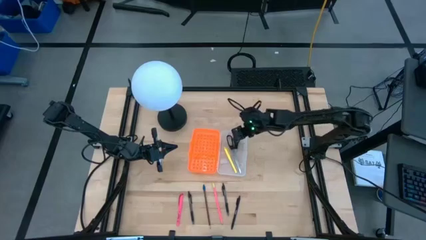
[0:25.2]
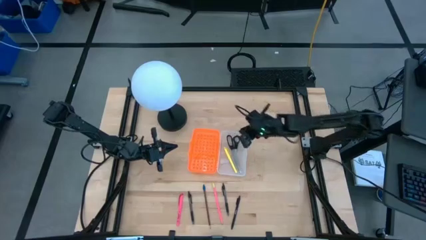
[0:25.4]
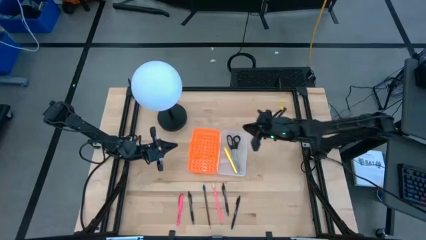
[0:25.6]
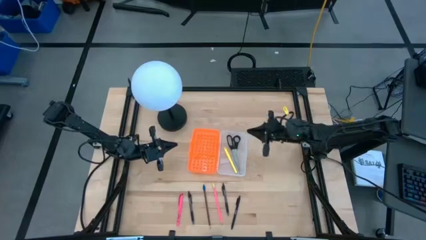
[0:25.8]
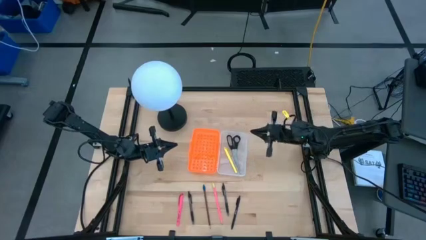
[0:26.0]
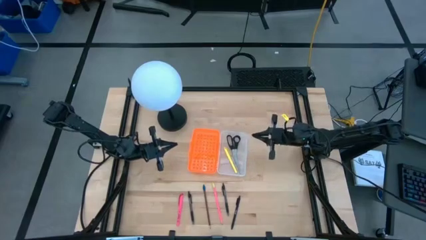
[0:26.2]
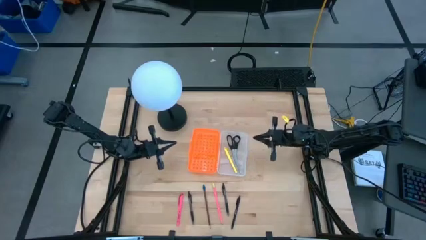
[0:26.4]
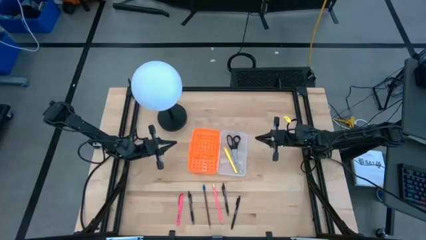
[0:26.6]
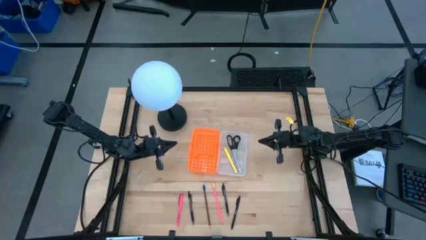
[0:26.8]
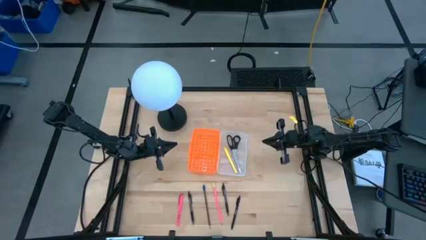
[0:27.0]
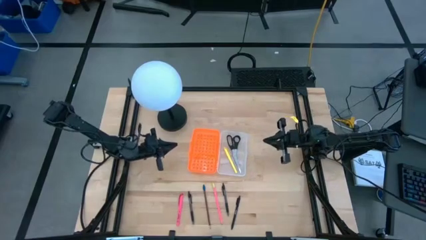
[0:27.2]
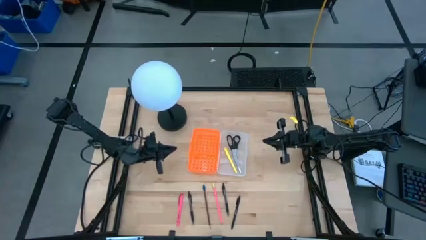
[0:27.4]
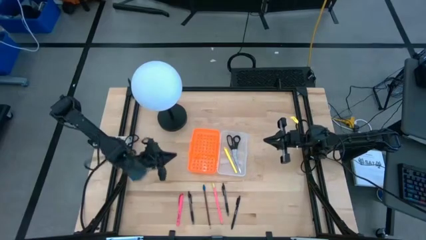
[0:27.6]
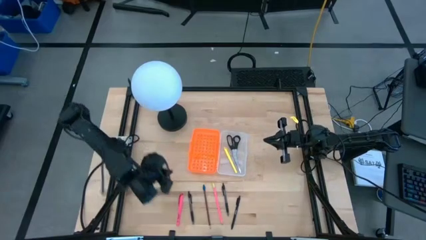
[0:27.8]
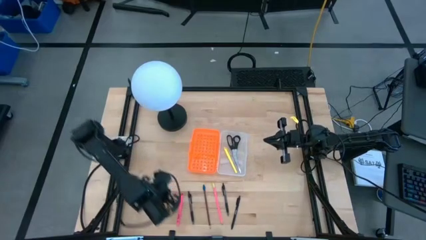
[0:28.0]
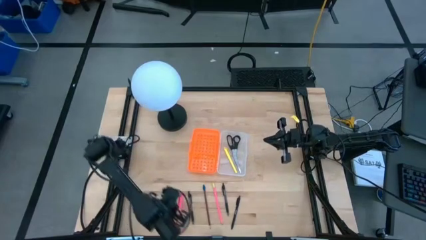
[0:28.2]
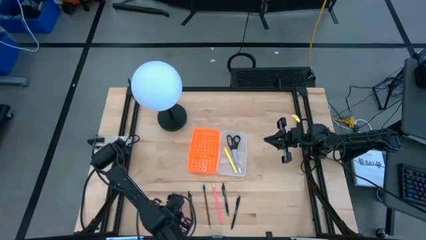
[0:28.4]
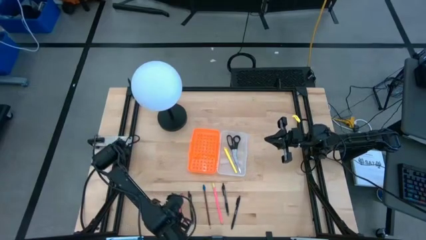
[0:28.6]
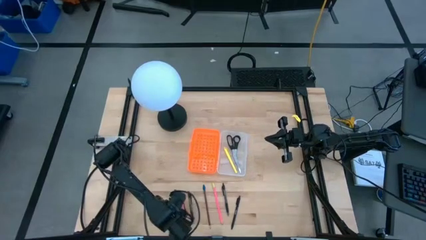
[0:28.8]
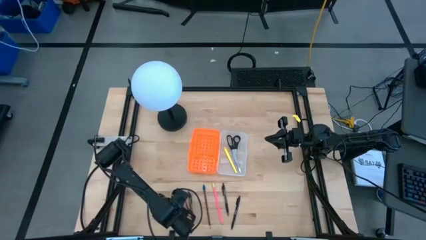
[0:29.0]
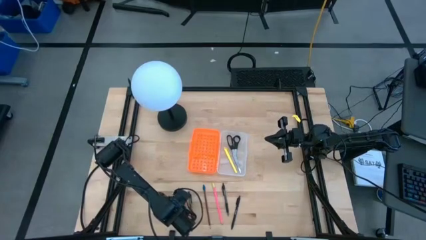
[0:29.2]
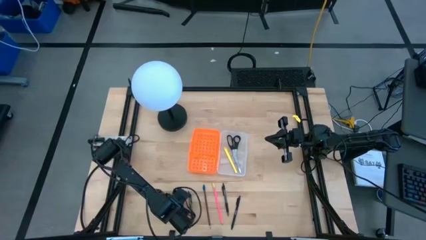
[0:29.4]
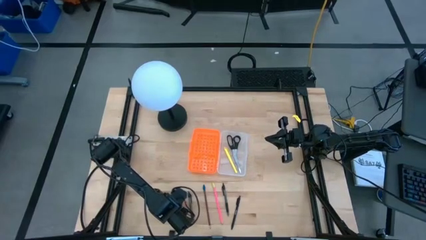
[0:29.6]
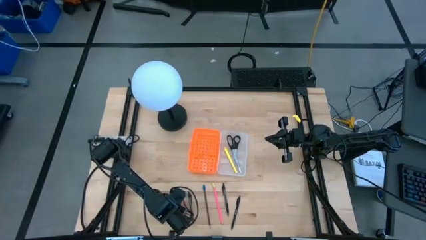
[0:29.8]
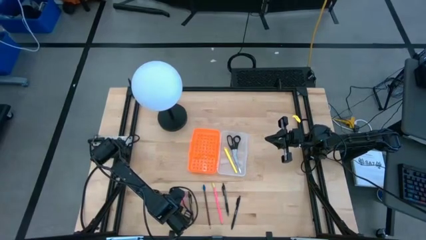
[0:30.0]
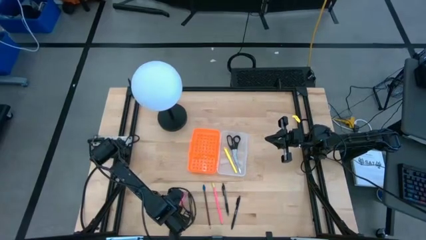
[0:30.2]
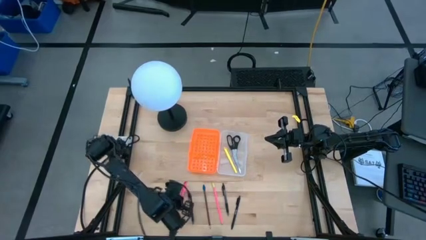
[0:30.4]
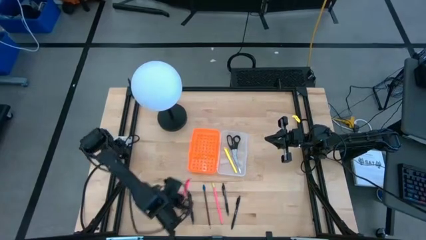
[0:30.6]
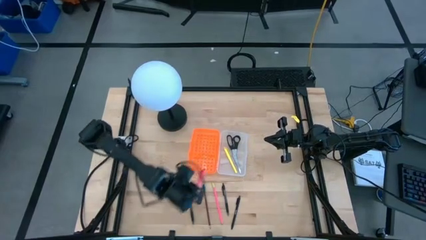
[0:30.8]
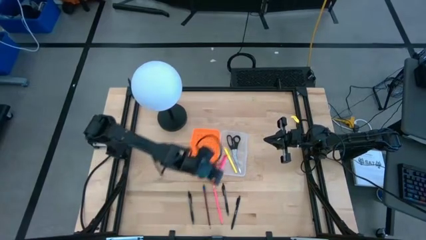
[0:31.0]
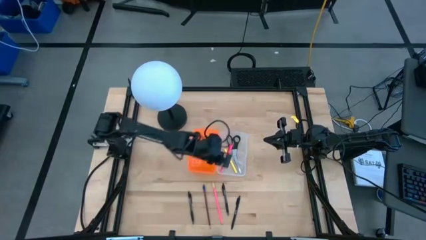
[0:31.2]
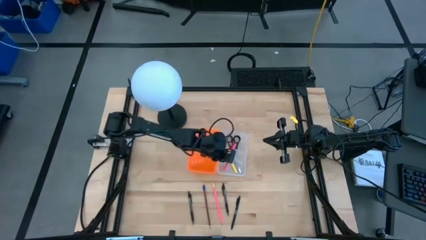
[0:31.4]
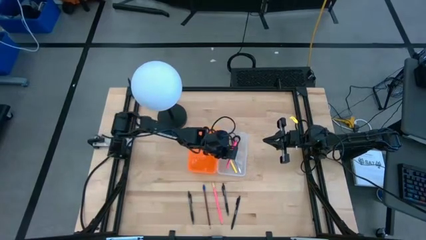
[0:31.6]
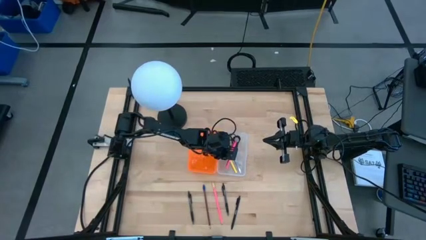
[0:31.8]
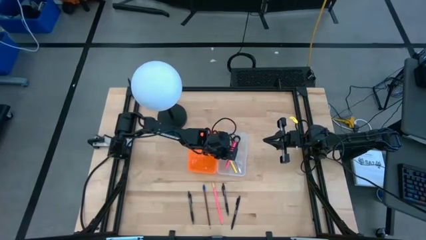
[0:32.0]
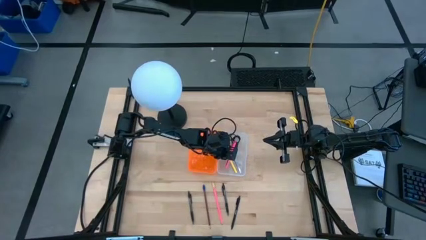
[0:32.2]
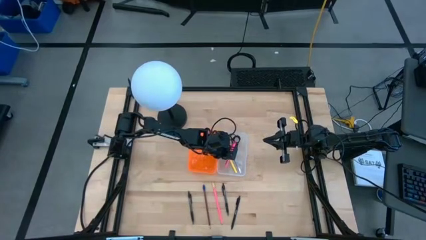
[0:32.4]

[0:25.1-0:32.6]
Task: Pick & place school supplies into a supply box
Put the pink pen into the orange supply box

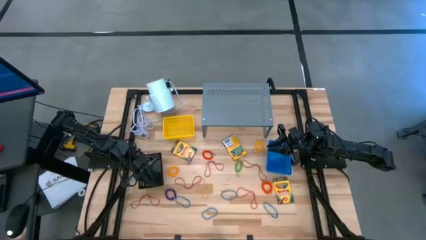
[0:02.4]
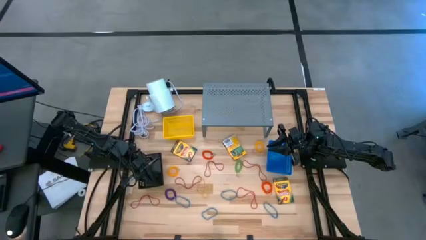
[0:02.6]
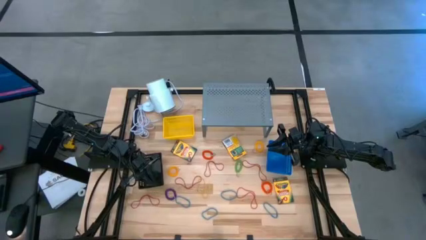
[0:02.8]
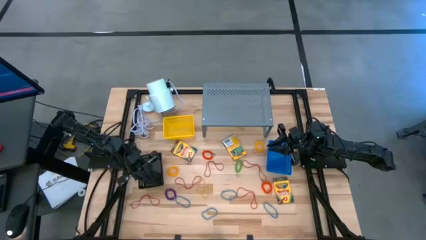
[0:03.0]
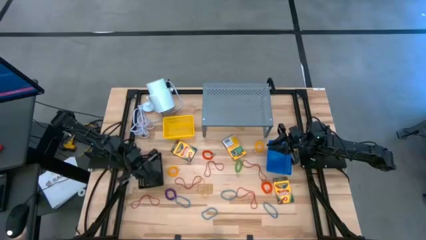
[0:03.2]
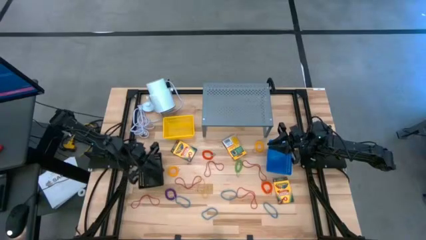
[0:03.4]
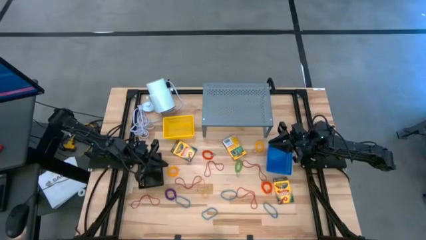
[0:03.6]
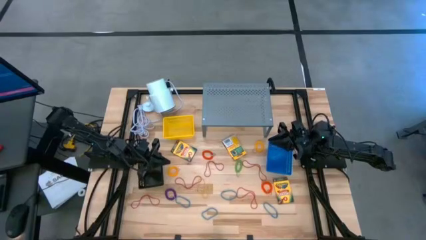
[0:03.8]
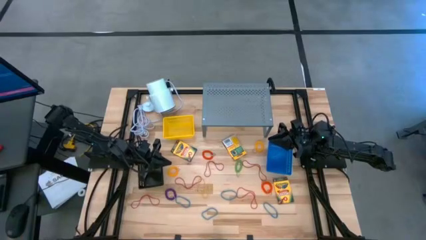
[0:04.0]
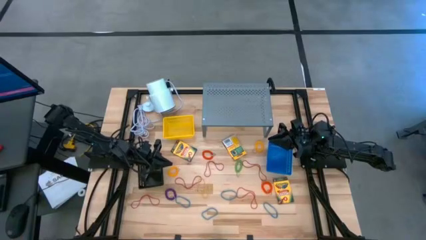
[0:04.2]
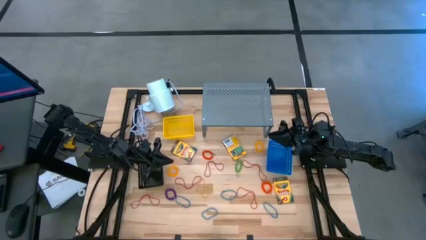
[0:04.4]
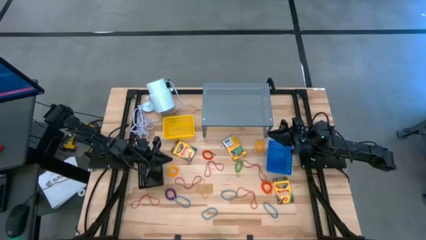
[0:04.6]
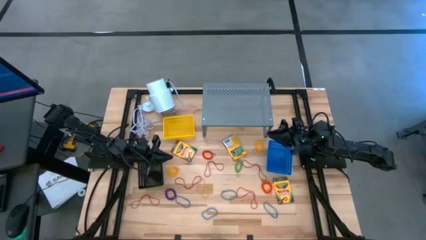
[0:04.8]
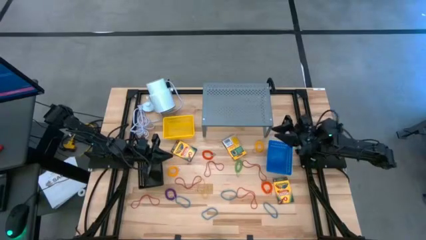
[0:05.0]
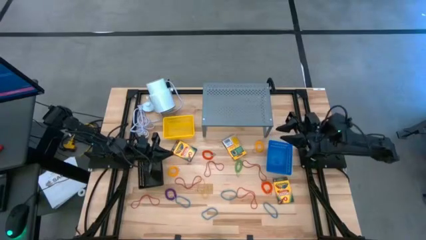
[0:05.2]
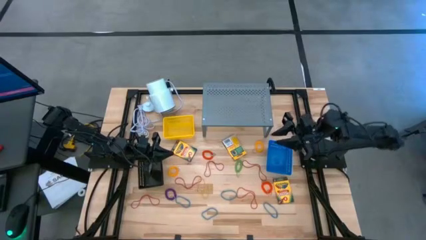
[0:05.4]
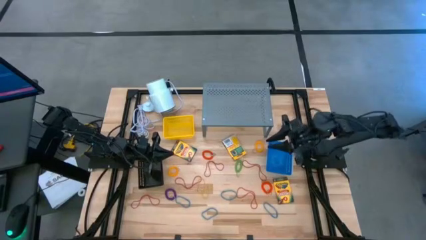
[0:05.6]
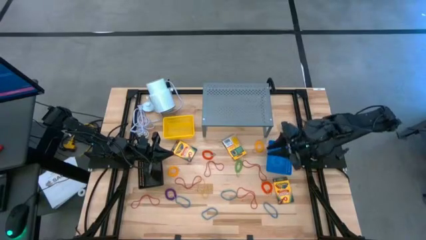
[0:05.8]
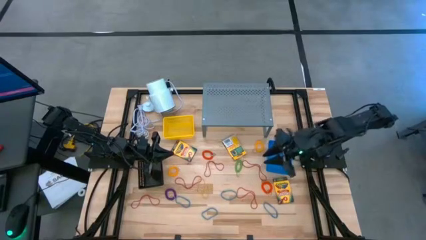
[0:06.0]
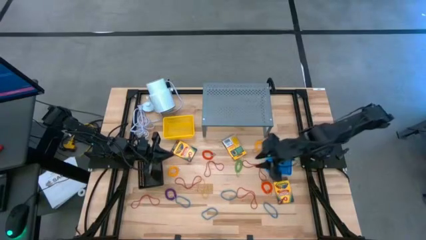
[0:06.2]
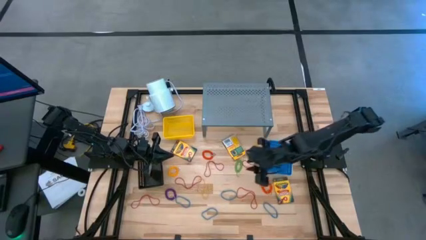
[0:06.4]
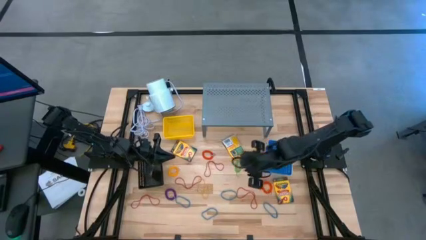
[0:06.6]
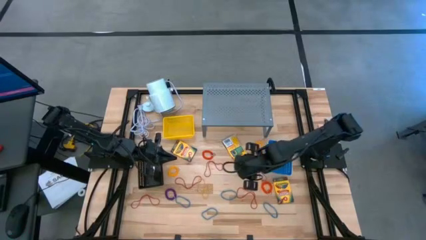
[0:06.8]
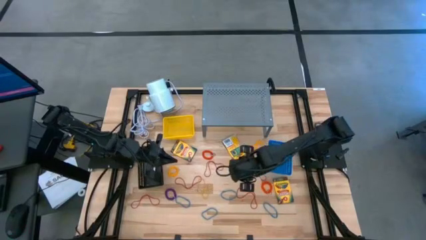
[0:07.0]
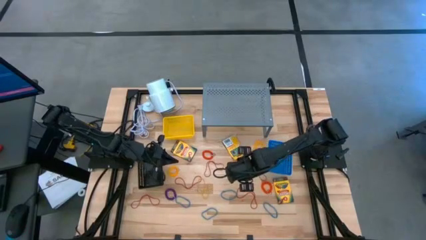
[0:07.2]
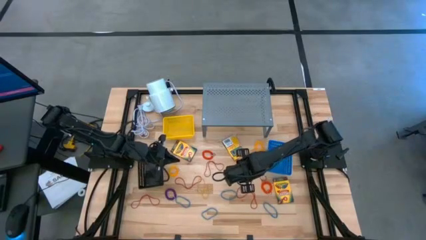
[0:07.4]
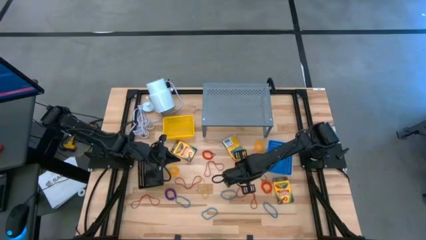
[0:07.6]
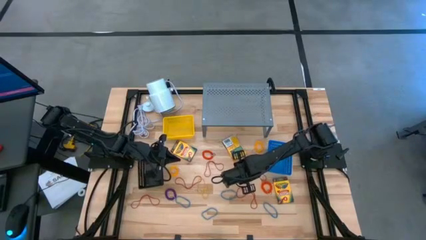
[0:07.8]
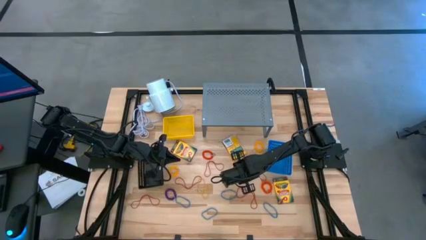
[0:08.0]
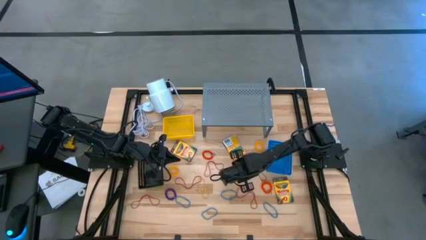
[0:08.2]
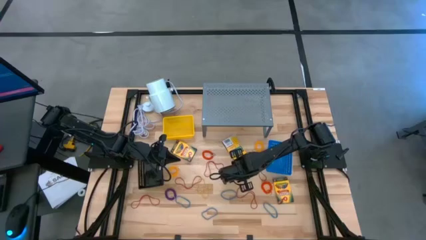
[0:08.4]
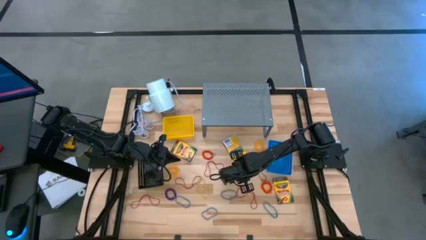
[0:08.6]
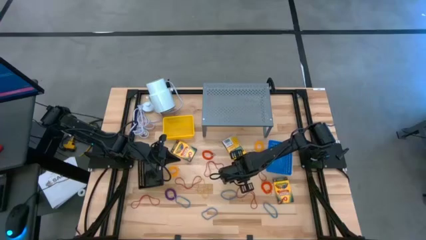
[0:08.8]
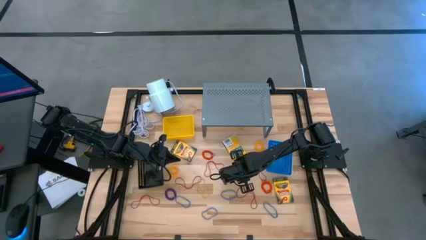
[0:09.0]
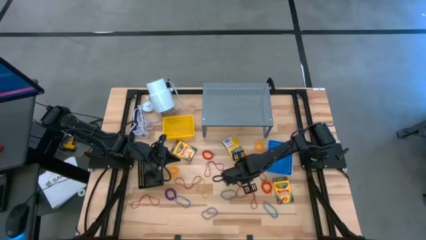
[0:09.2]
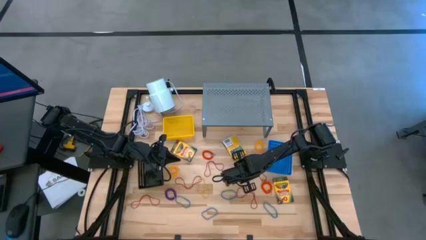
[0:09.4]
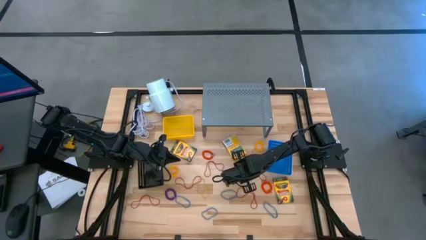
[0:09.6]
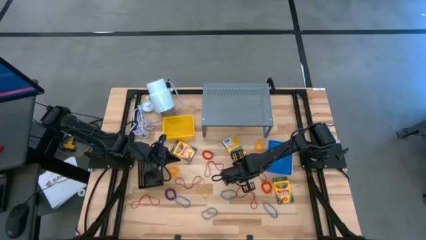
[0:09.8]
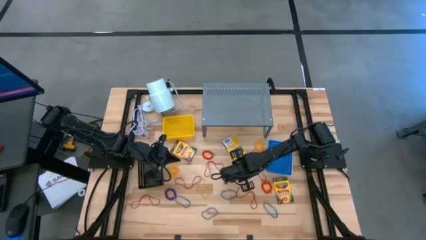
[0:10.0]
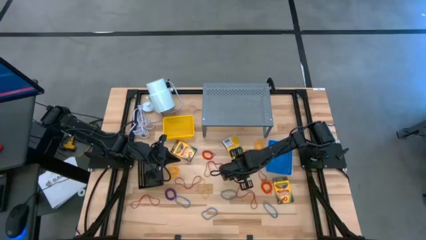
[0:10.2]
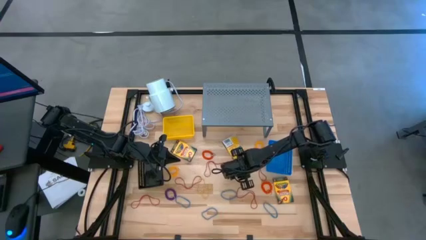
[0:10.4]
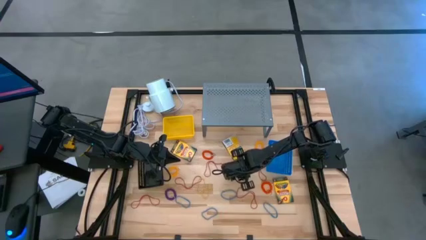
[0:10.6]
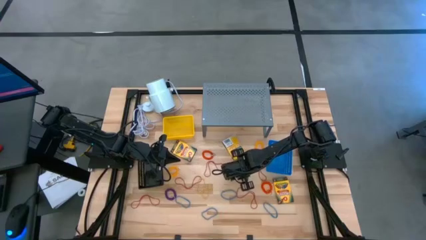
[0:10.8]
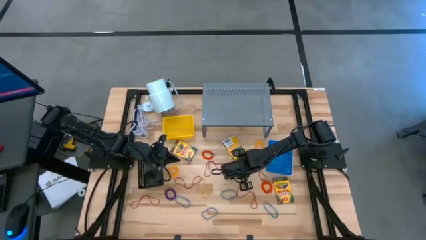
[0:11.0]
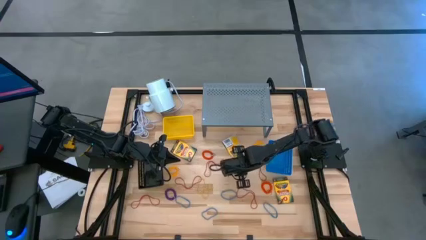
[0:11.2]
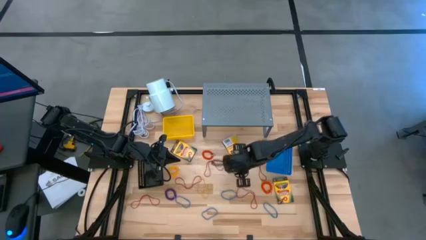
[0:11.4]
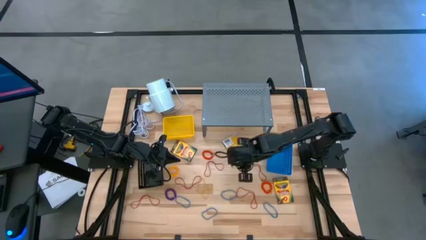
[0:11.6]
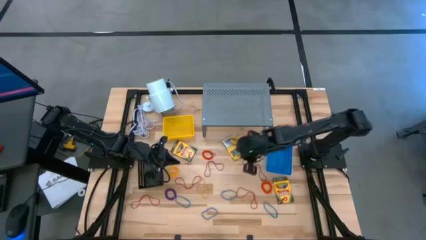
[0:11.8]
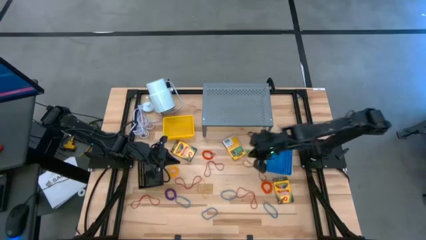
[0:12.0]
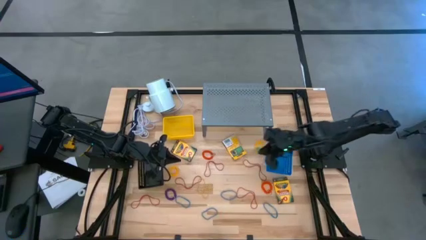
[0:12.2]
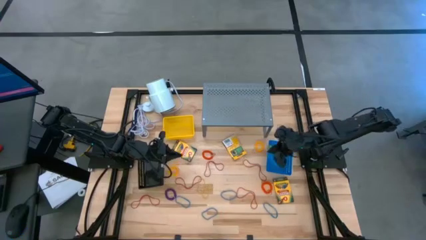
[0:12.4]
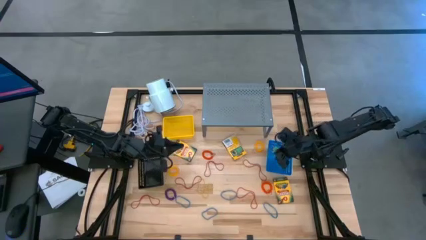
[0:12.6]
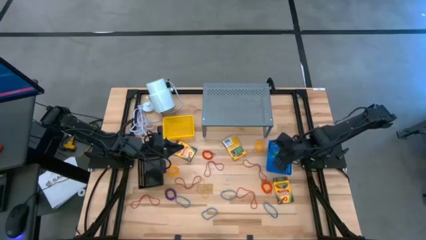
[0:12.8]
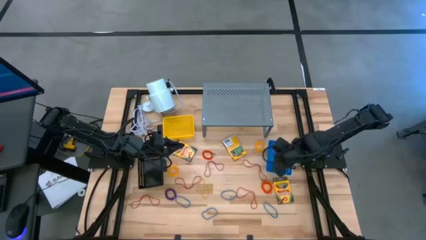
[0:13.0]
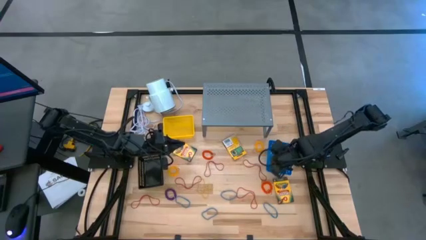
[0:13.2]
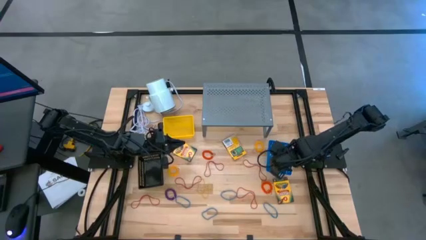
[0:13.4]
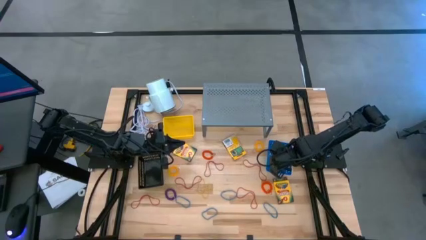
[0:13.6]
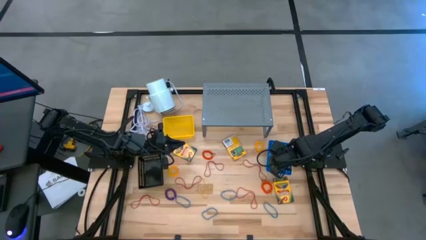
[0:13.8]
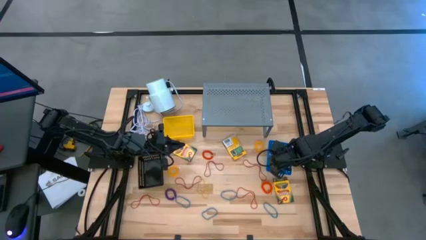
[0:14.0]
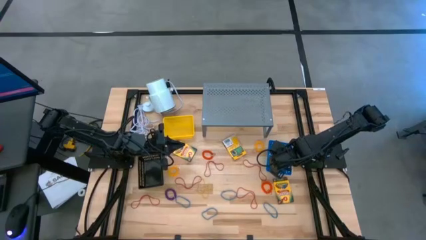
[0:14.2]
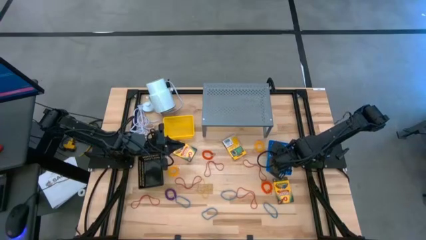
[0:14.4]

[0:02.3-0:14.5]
Task: Pick & Place Office Desk Supplies
Put the green spring keychain into the blue bin
